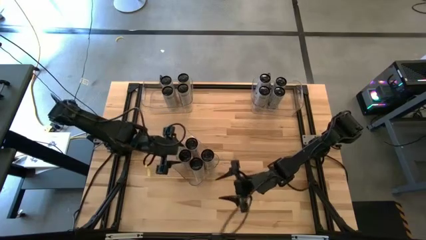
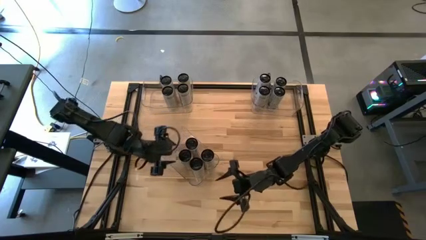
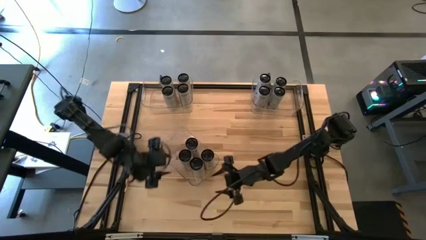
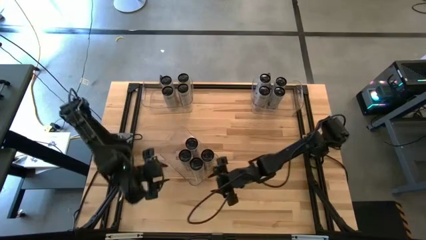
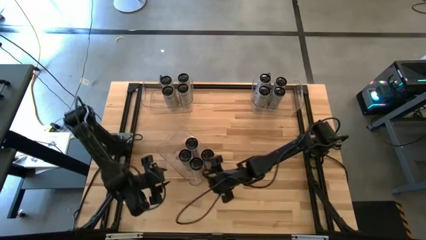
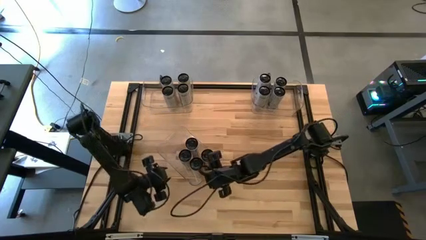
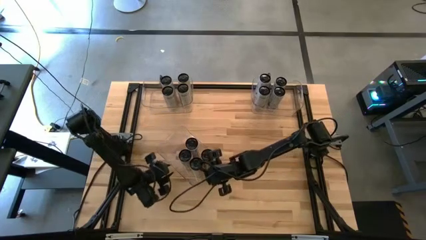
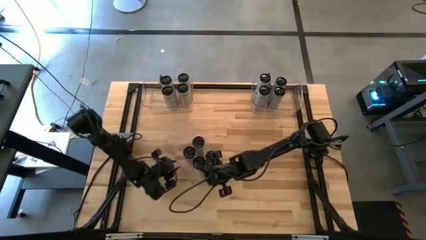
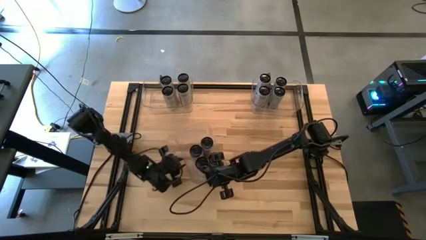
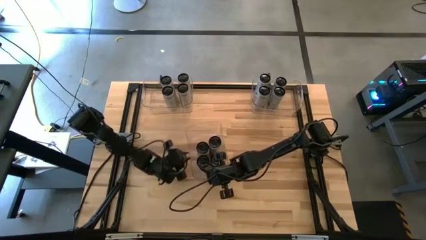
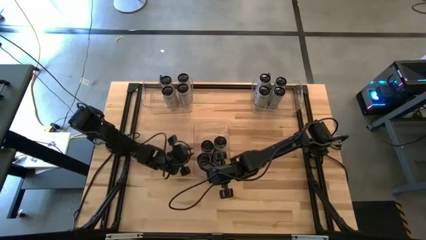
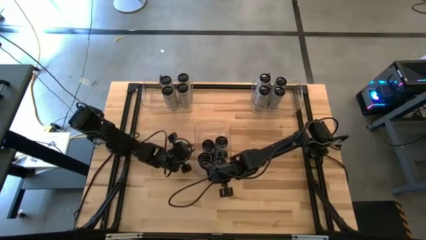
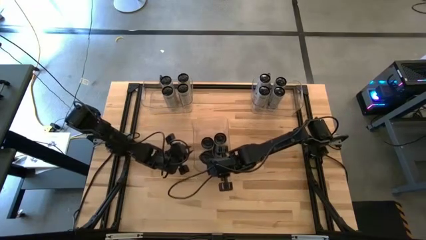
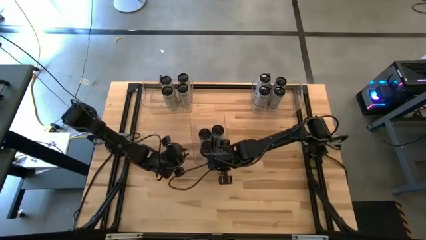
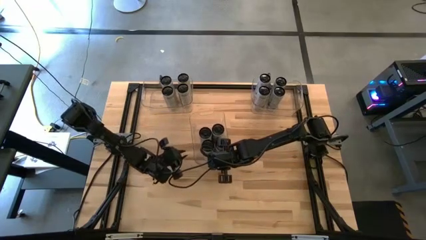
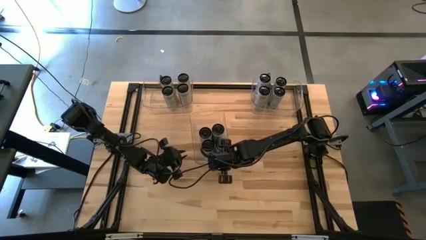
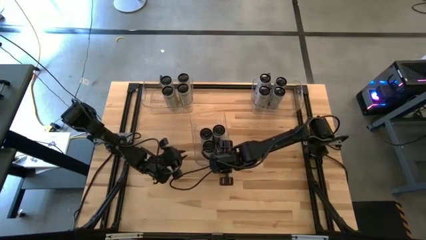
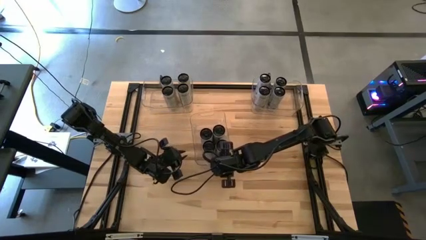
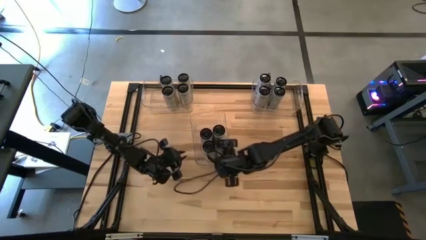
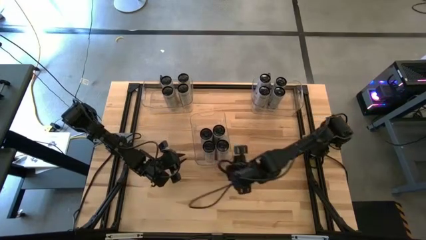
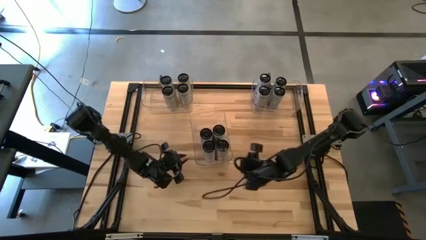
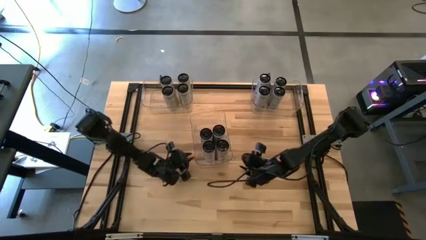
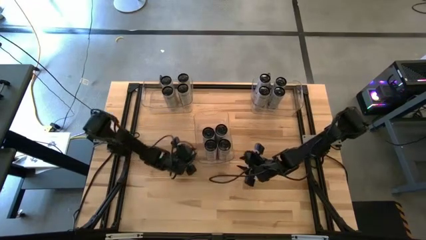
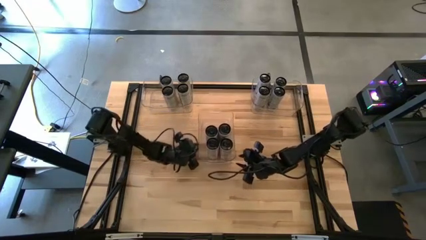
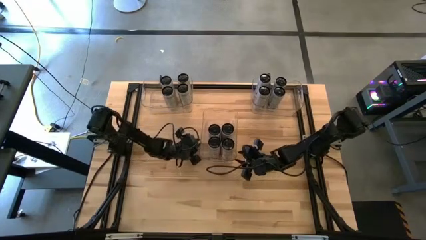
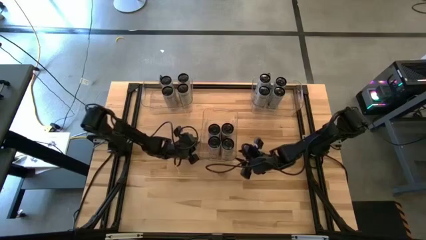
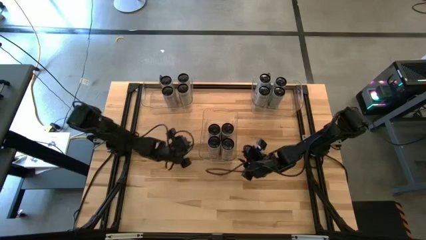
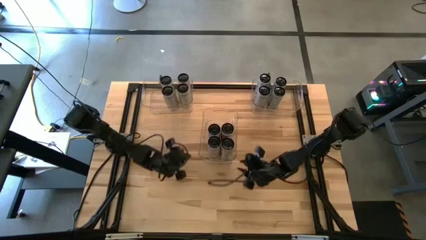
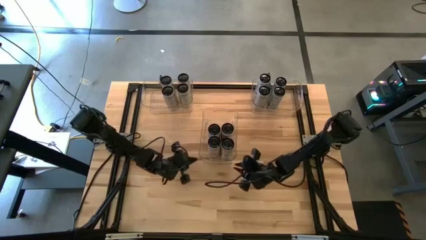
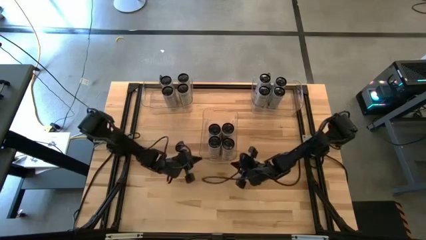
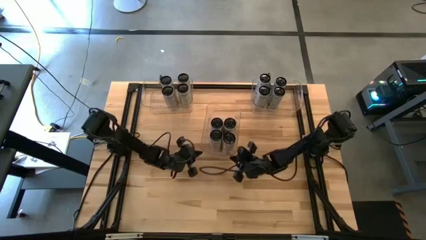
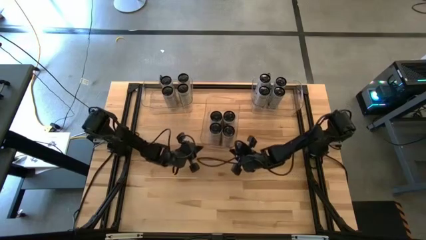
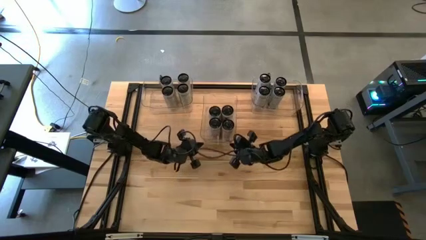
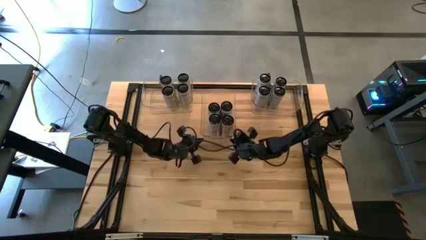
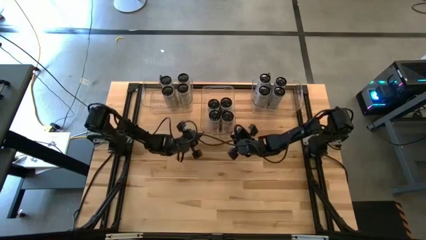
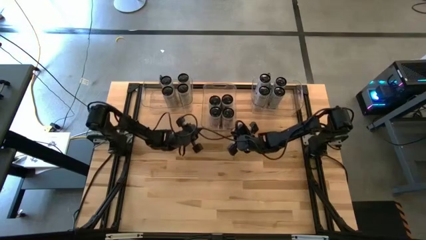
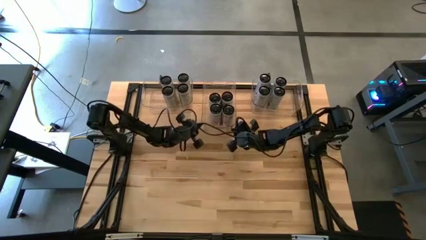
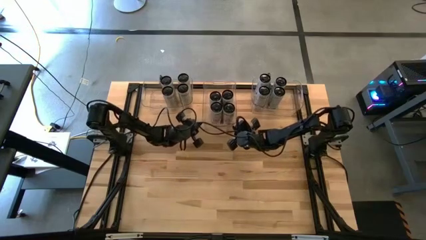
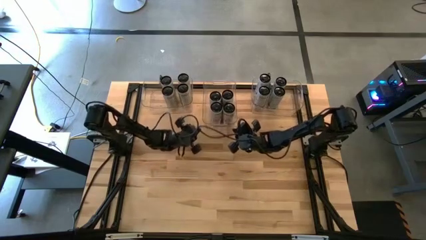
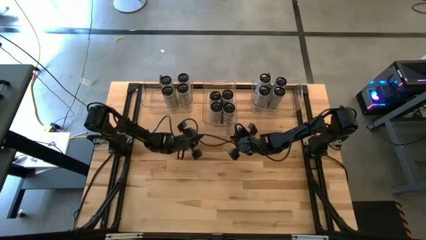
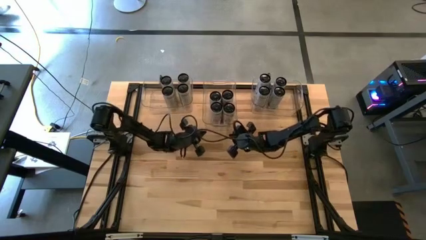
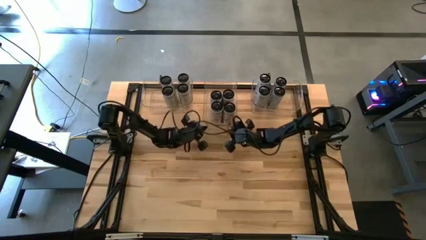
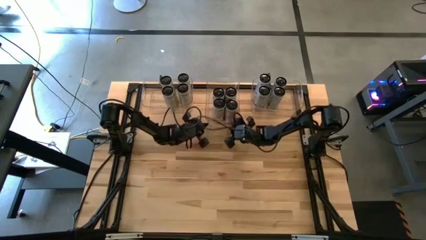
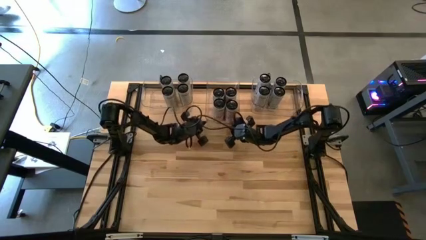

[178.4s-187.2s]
Task: Sort soda cans
Move the center transparent bin to the top center of the table

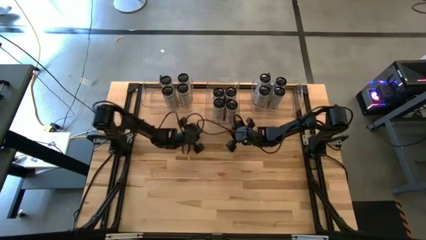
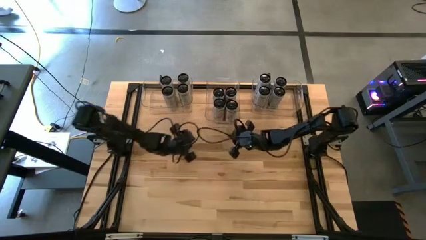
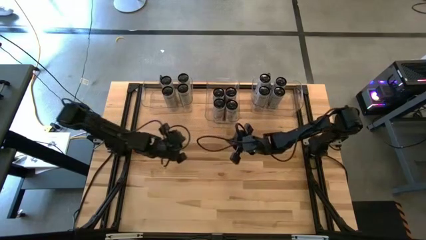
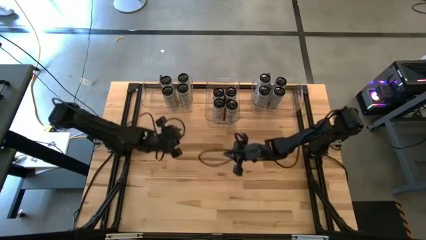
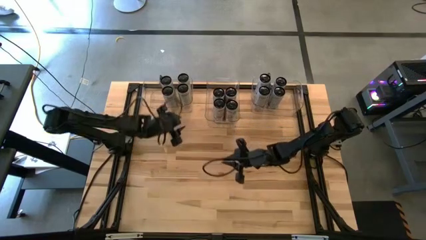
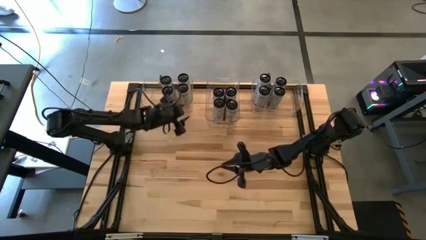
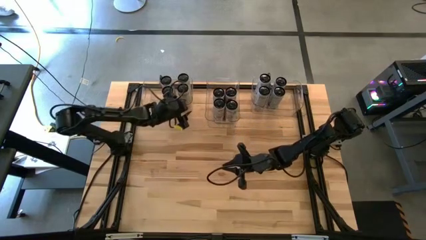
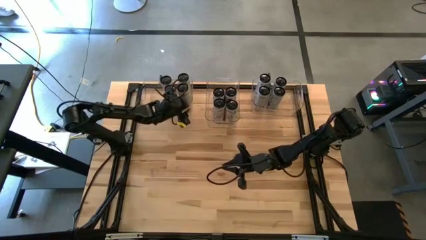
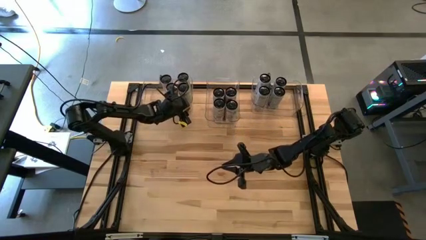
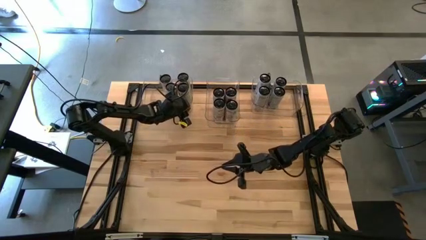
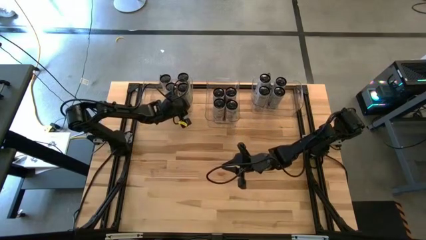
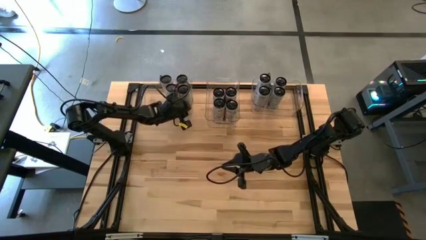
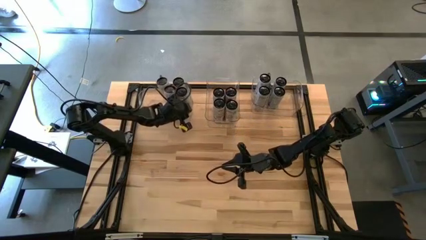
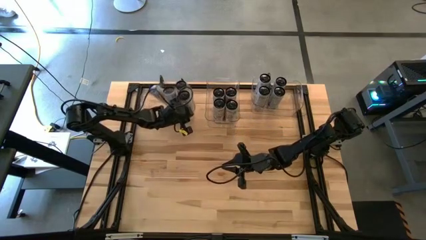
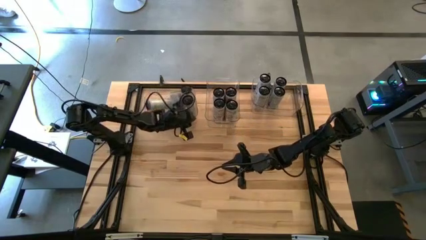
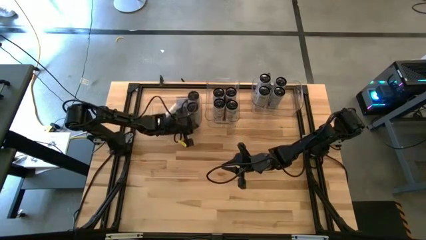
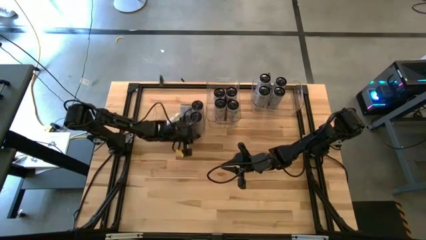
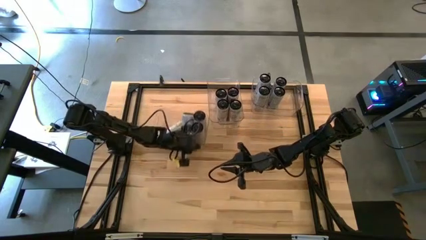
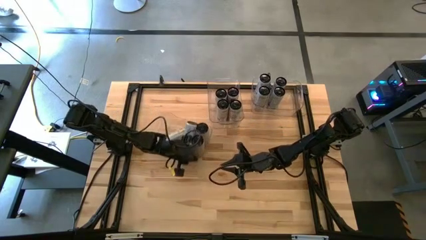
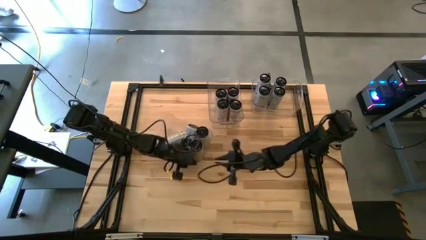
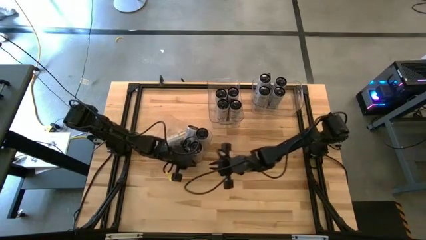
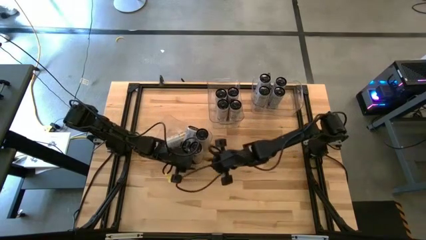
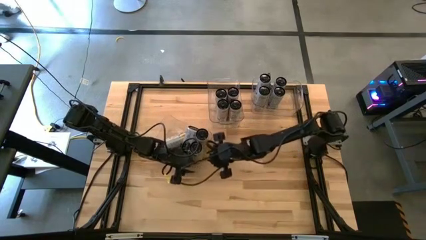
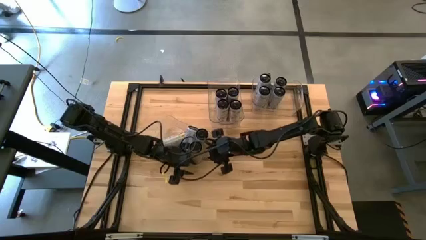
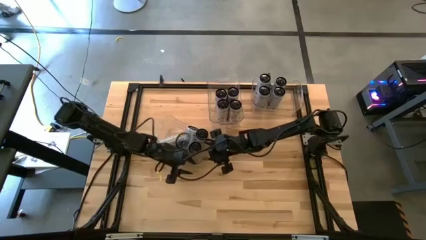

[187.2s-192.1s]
Adjust the top left transparent bin

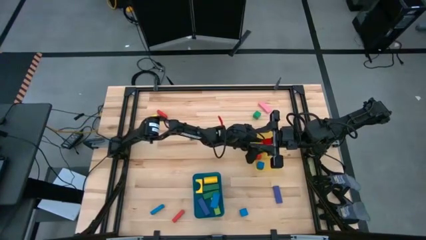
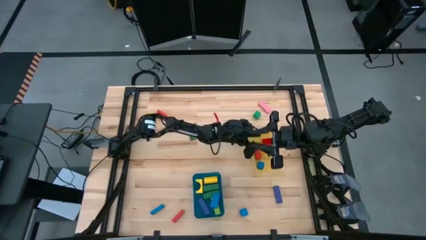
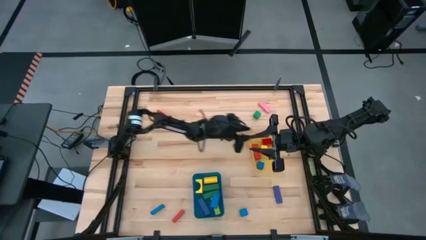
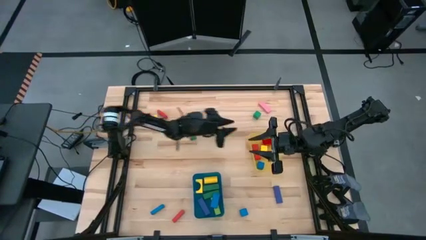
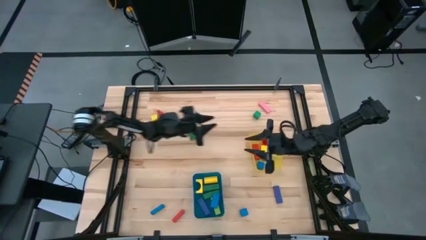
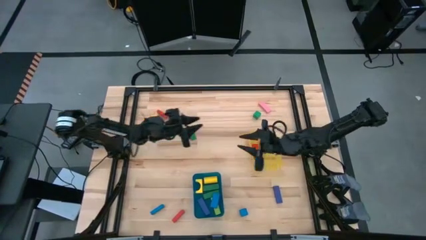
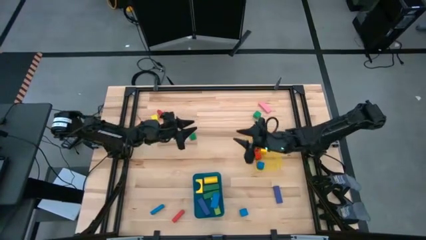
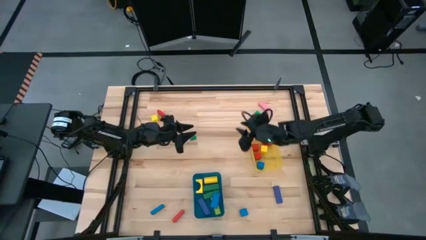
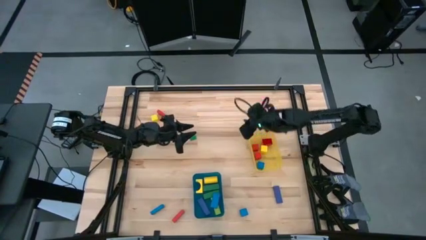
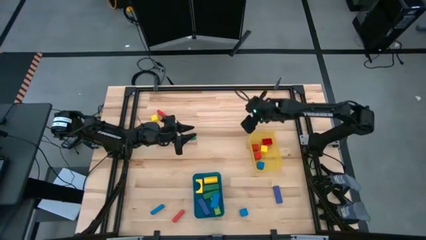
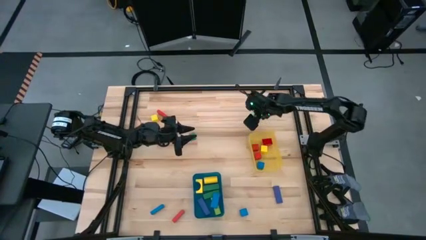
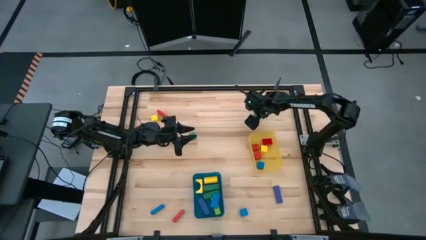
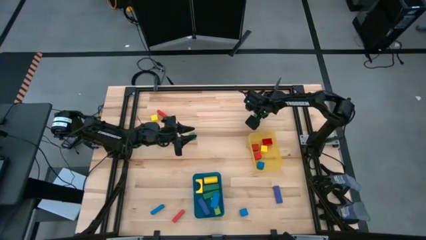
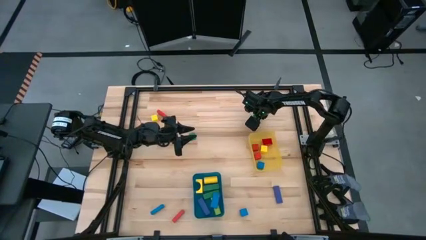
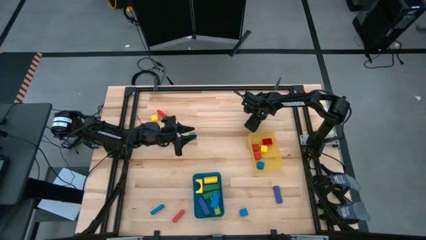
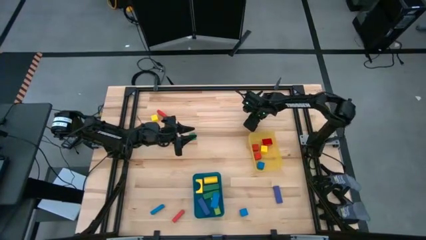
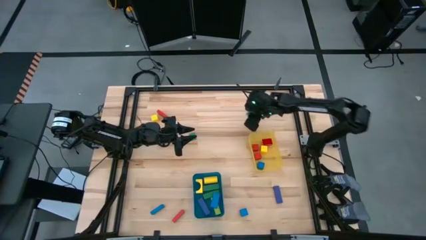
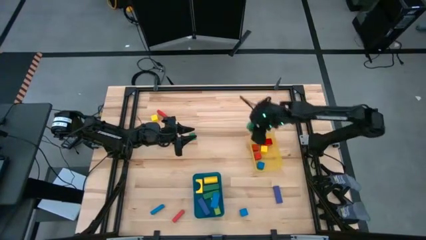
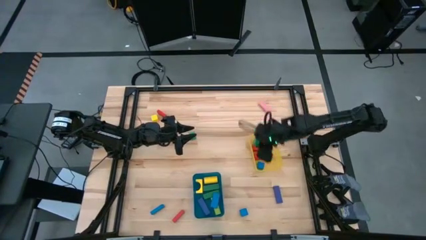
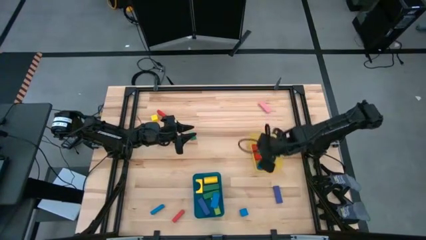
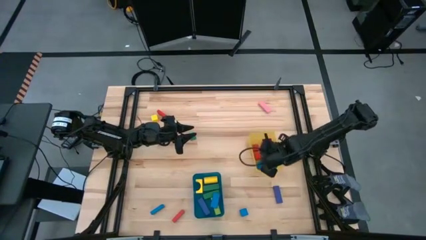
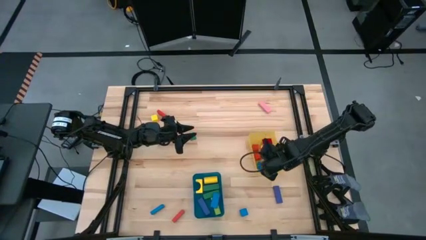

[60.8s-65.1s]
Task: Sort blocks by size
Put the small green block into the yellow bin
